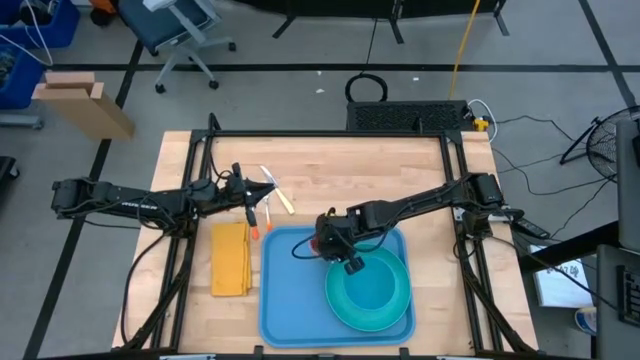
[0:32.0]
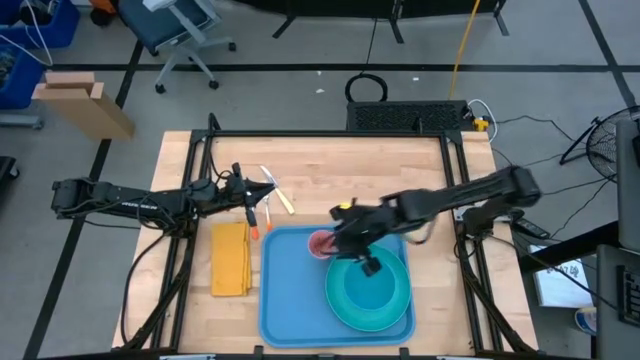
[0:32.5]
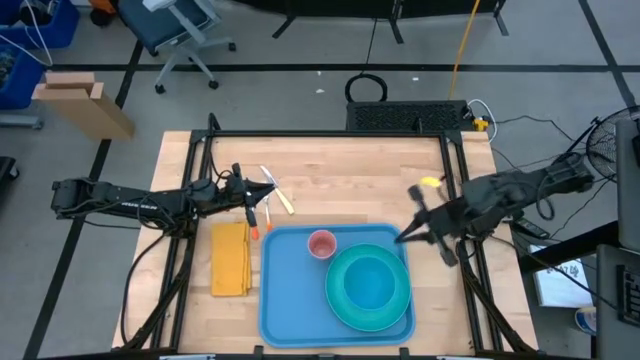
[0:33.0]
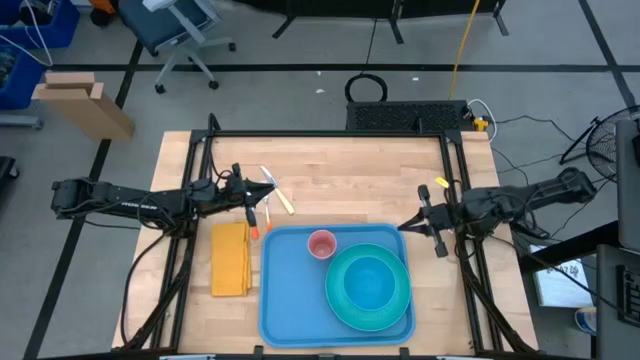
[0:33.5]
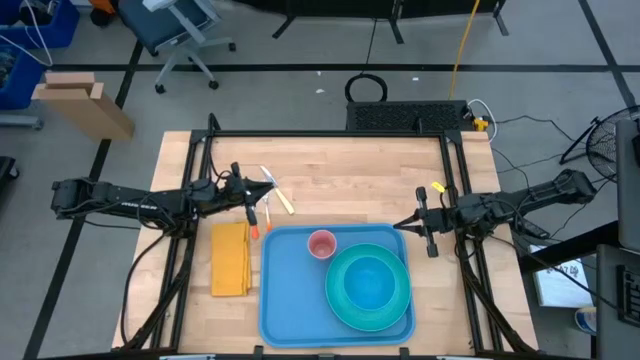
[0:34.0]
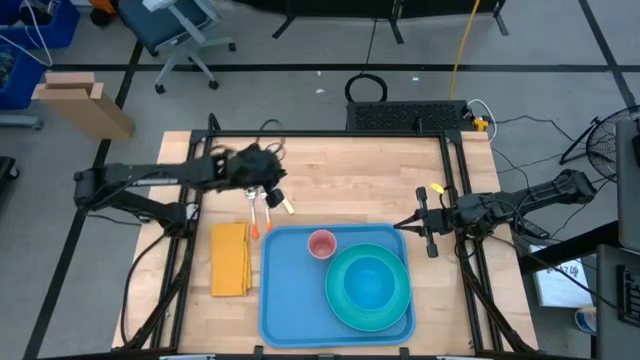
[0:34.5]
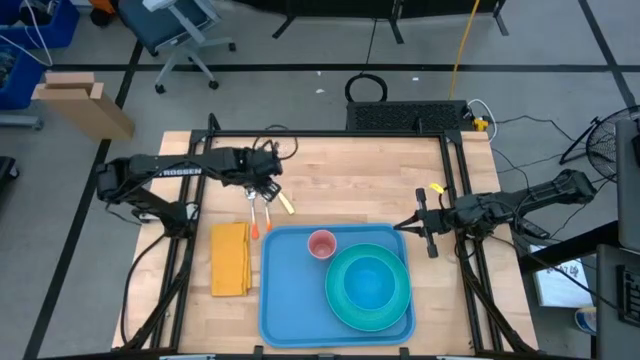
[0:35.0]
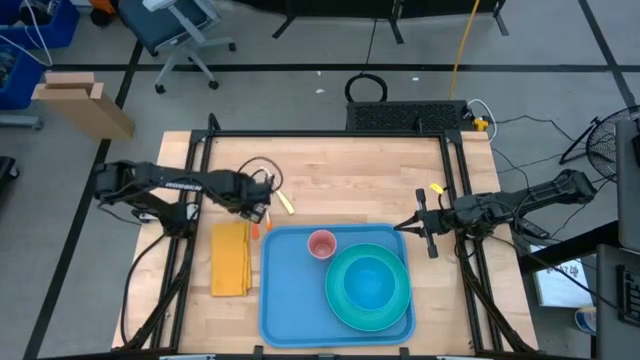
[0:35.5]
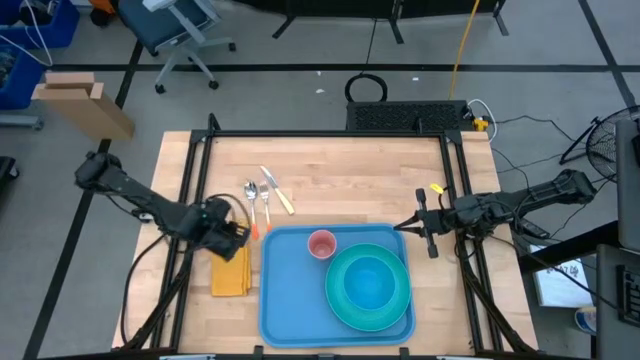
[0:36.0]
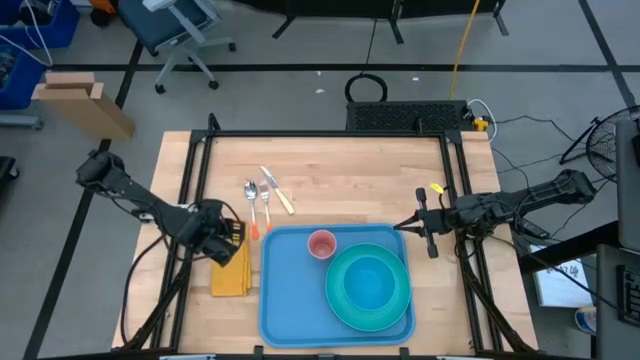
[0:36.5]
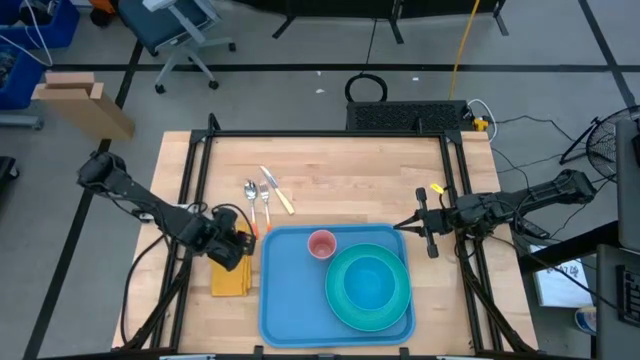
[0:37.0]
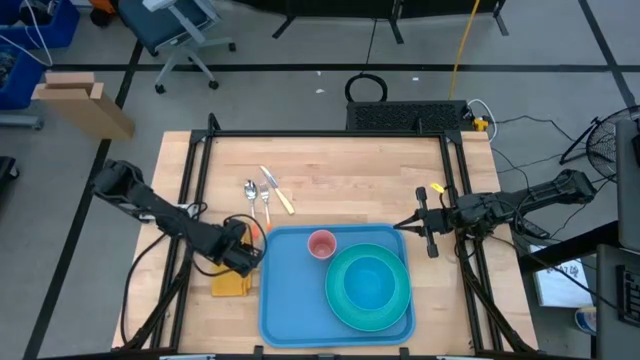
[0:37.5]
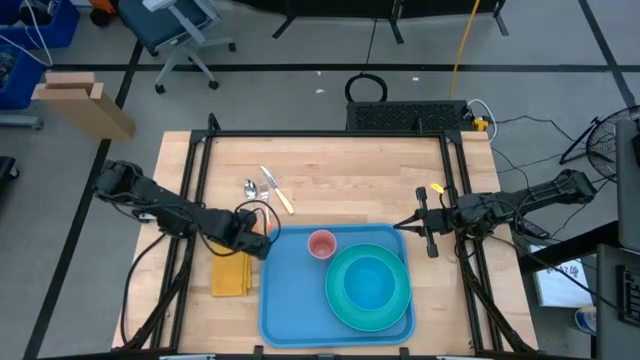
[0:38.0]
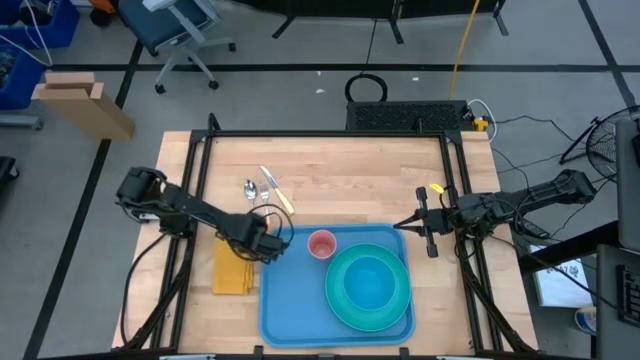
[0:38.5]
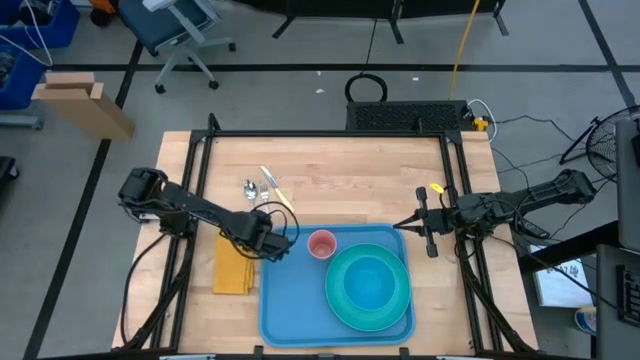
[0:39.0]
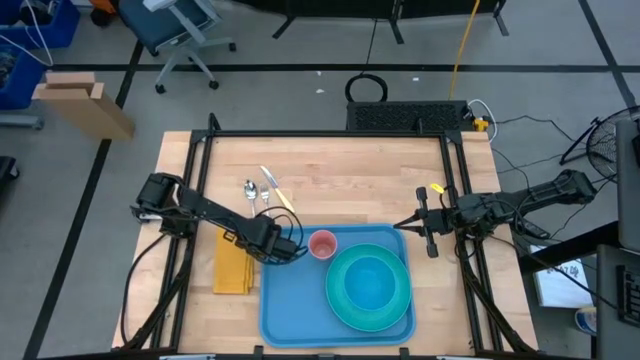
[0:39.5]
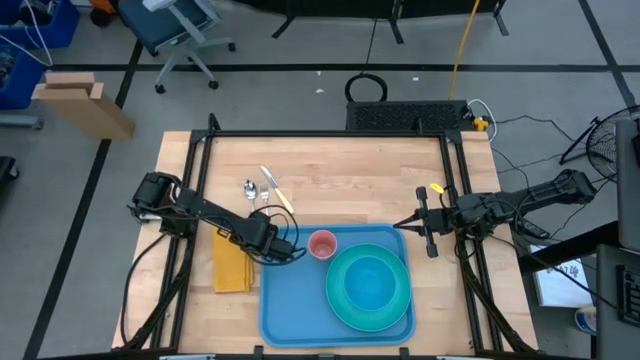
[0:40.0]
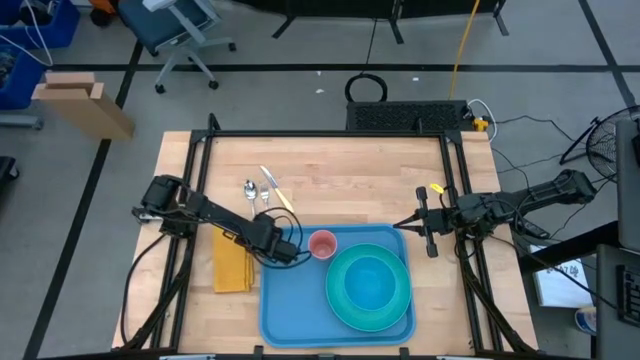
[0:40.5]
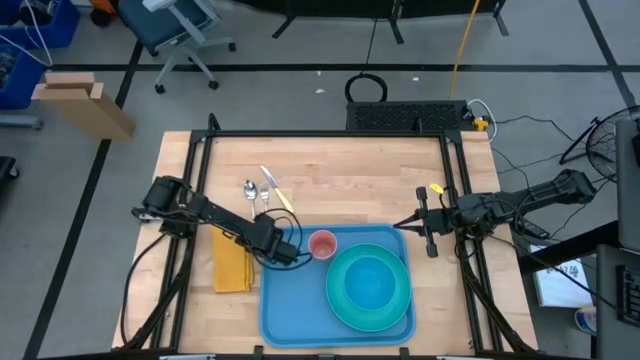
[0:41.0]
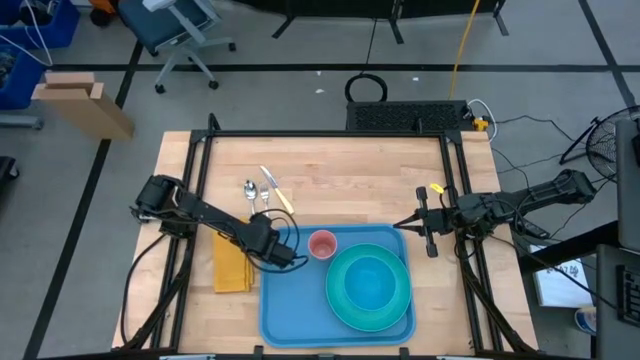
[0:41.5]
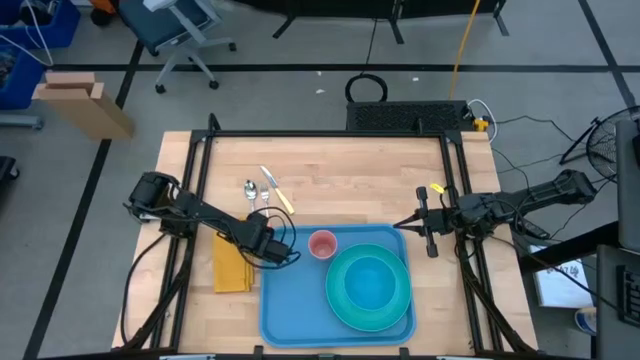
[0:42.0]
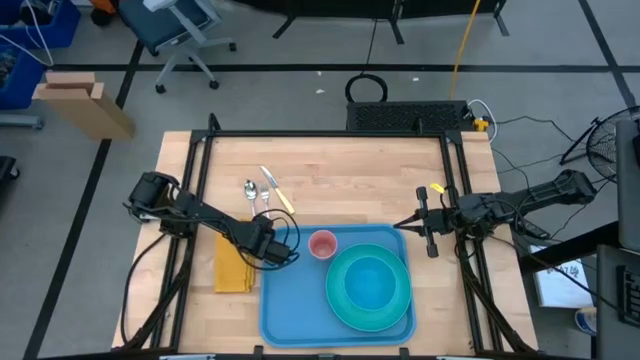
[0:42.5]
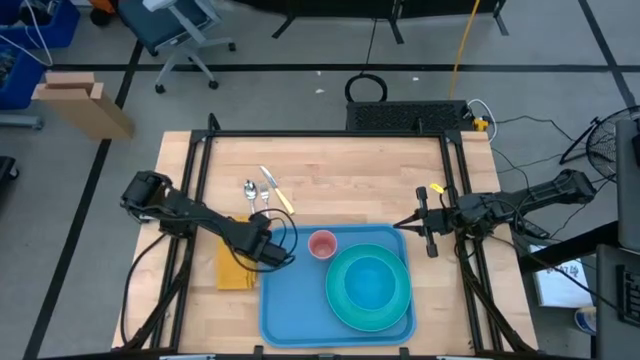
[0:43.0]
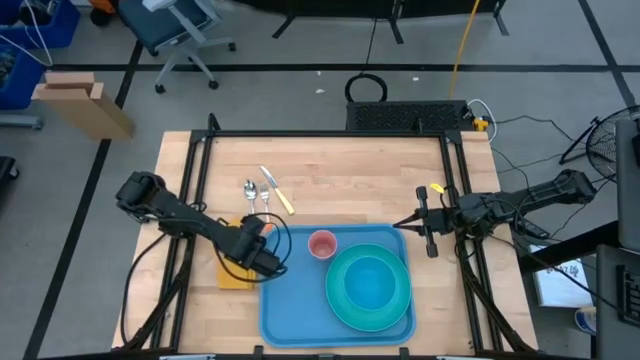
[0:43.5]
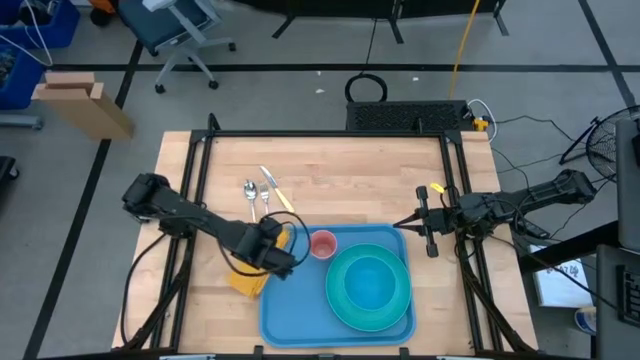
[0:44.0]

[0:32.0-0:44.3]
Task: Set up tray
Put the yellow napkin on the blue serving tray to the left of the light green plate

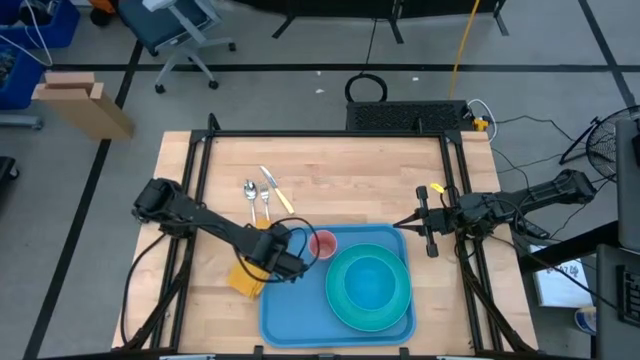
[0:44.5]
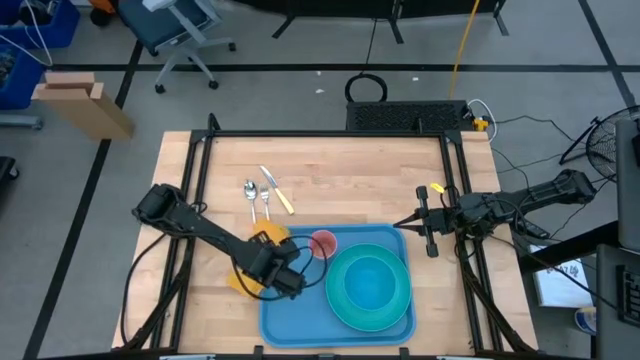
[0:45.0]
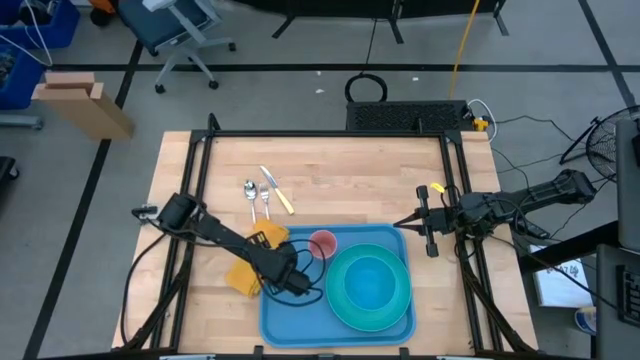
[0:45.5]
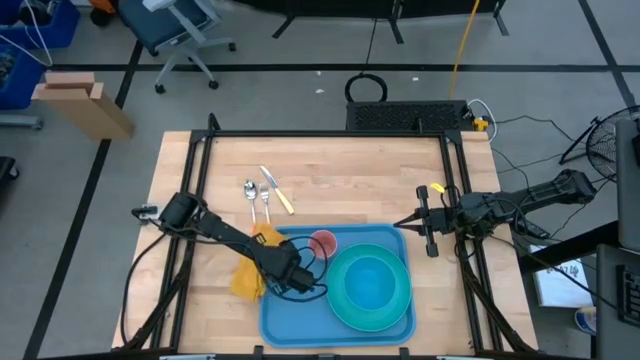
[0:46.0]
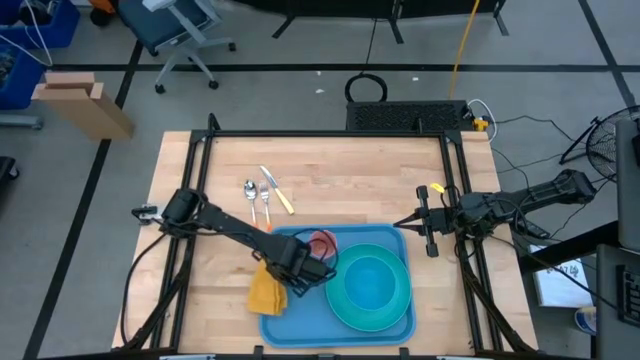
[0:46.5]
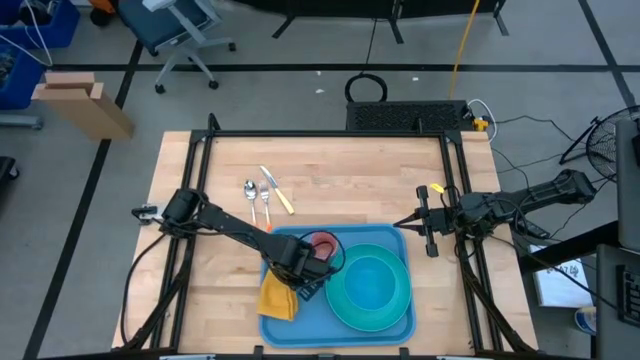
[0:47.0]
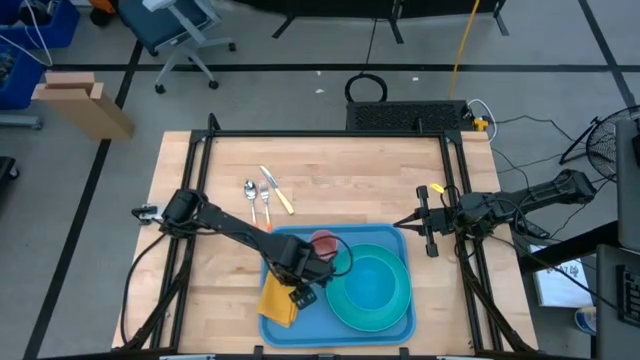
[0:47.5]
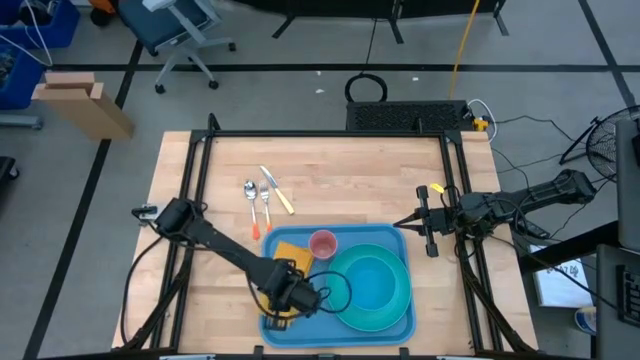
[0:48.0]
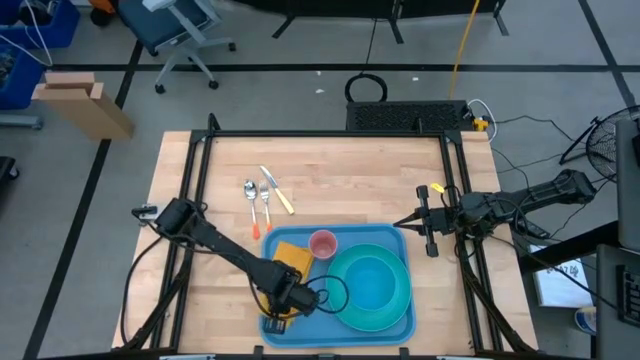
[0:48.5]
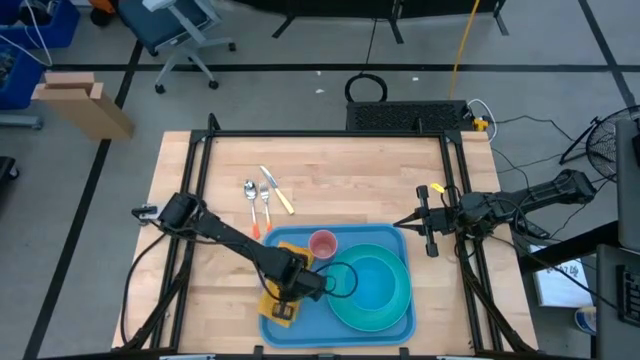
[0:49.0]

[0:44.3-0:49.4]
Put the yellow napkin on the blue serving tray to the left of the light green plate

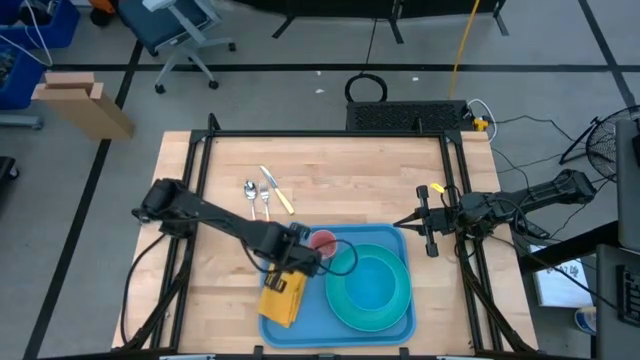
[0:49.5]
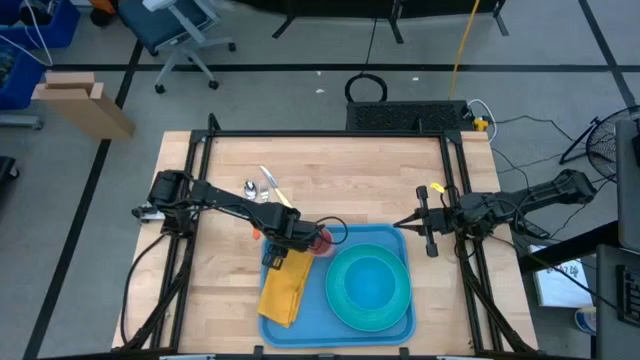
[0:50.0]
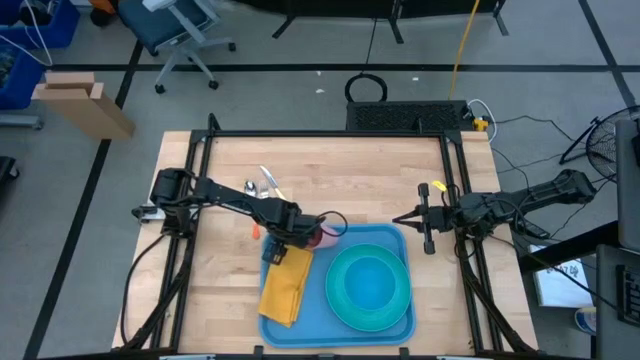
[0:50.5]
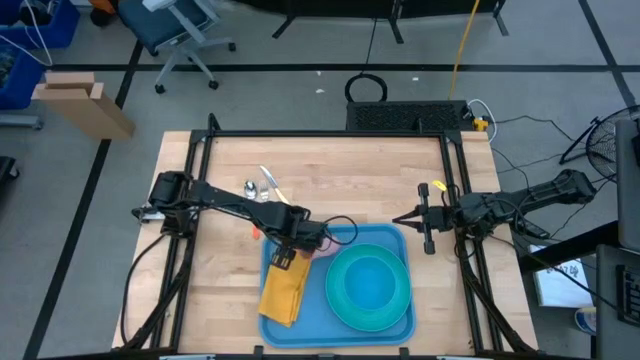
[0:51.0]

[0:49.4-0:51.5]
Adjust the yellow napkin on the blue serving tray

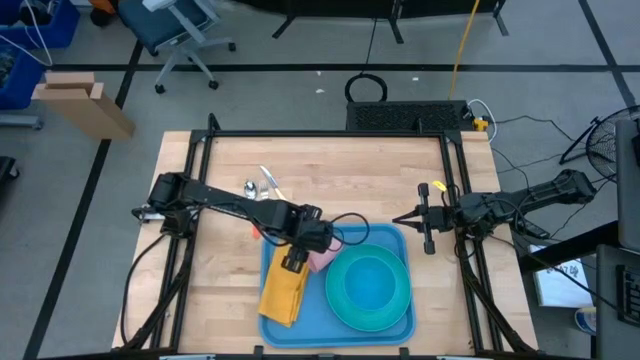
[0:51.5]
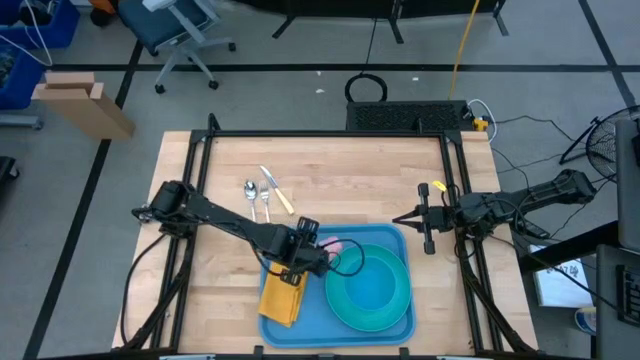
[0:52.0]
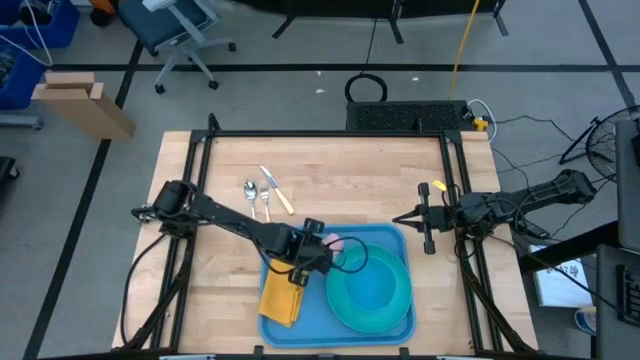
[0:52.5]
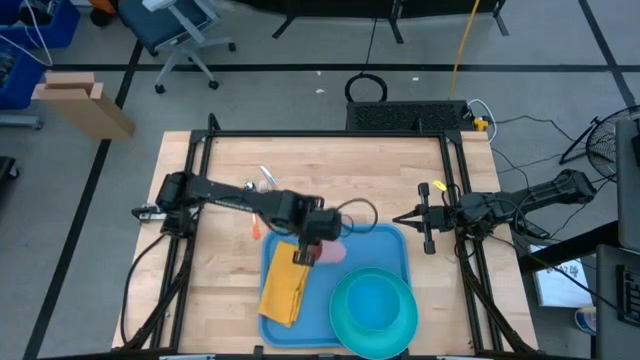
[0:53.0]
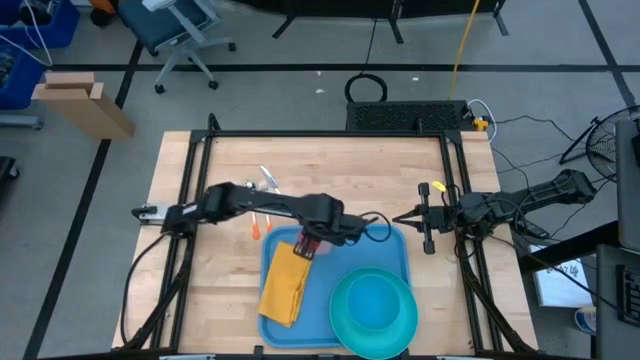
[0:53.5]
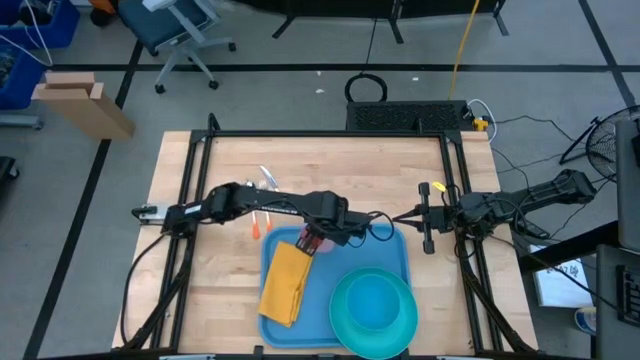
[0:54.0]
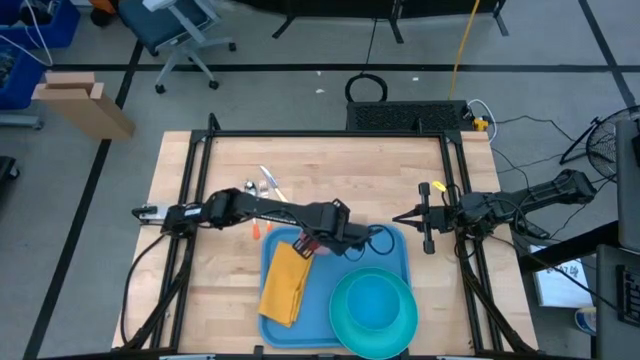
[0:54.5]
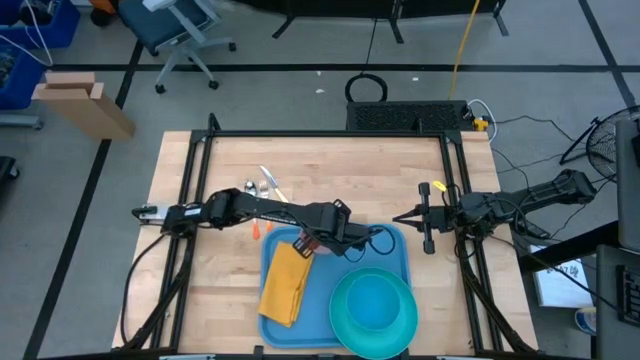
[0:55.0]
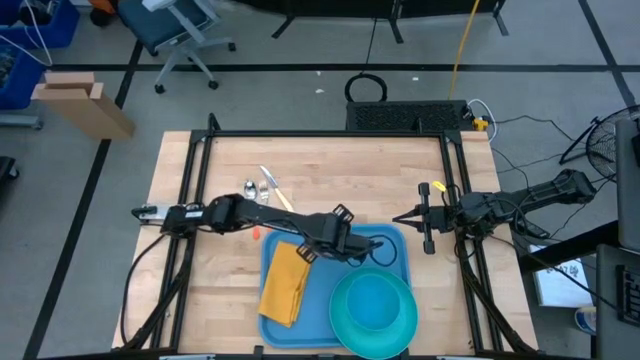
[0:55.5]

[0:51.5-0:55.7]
Adjust the pink cup on the blue serving tray
